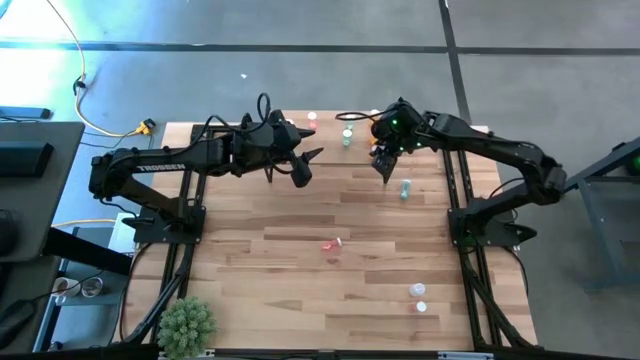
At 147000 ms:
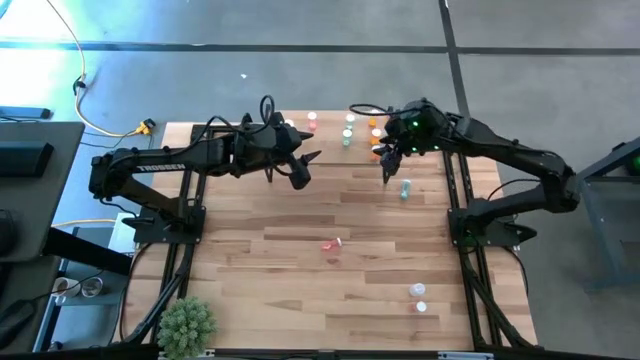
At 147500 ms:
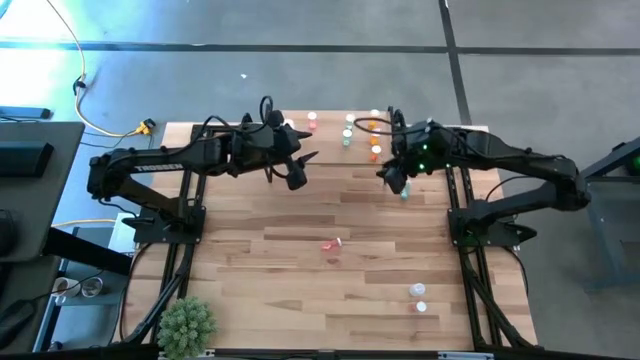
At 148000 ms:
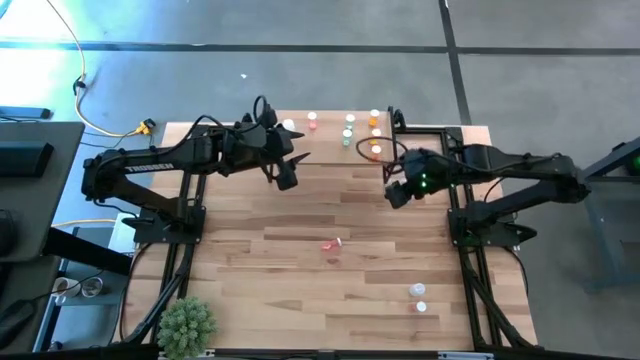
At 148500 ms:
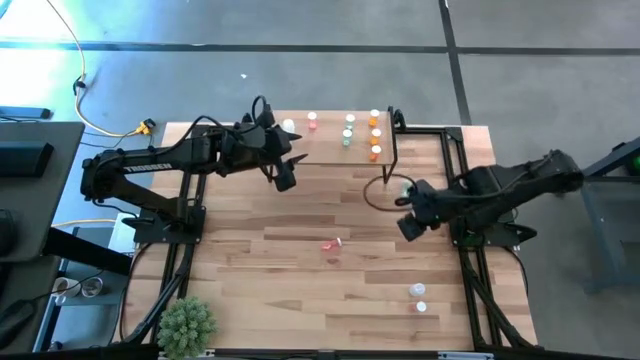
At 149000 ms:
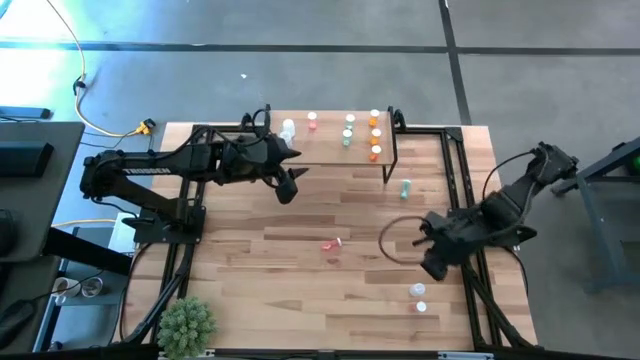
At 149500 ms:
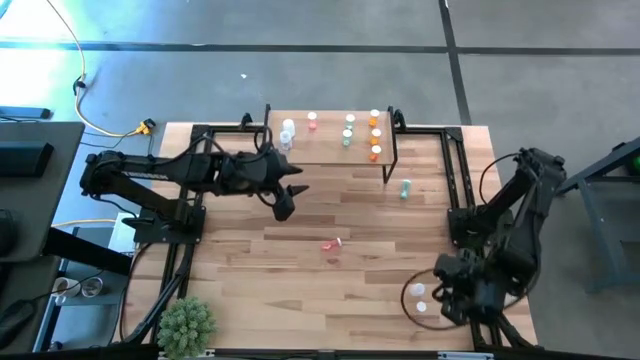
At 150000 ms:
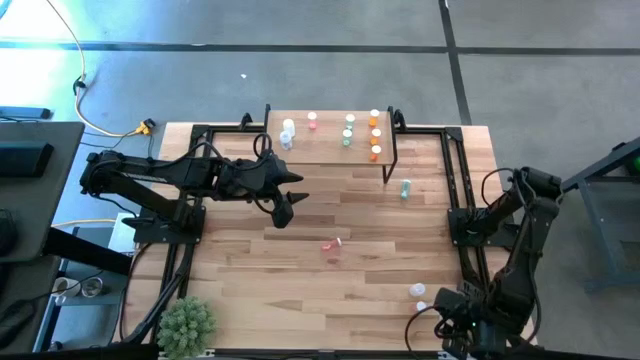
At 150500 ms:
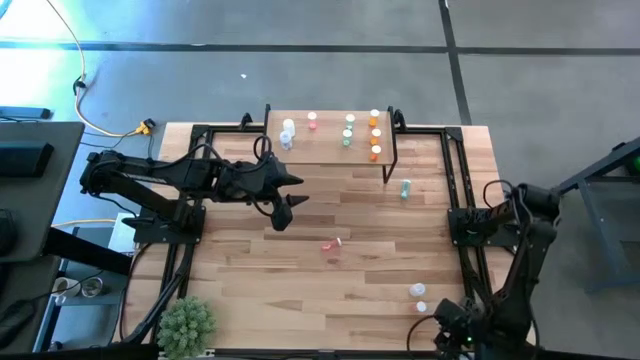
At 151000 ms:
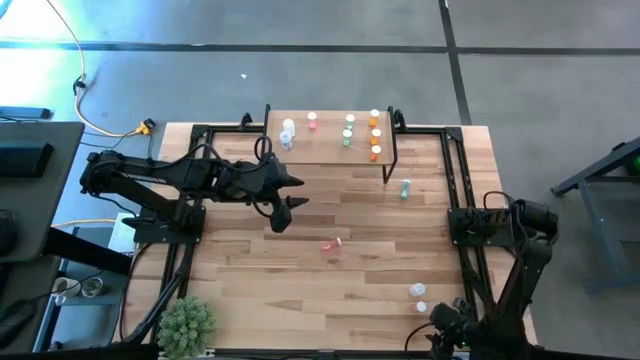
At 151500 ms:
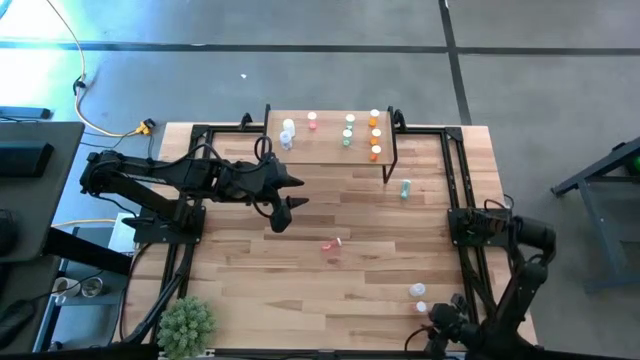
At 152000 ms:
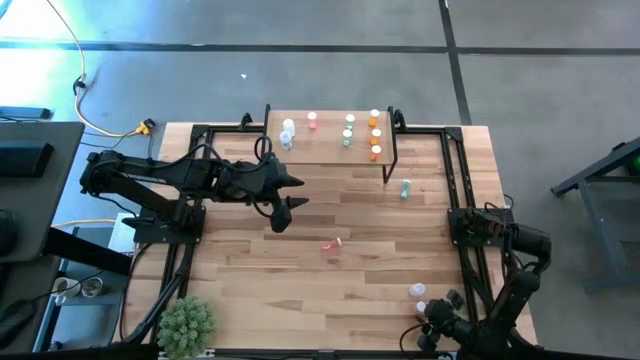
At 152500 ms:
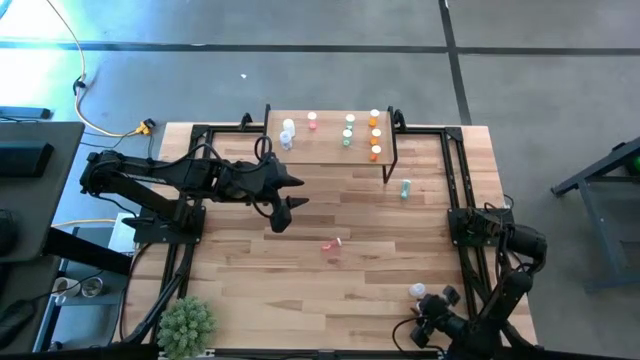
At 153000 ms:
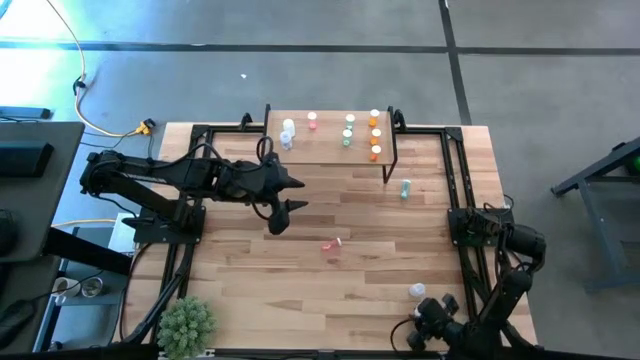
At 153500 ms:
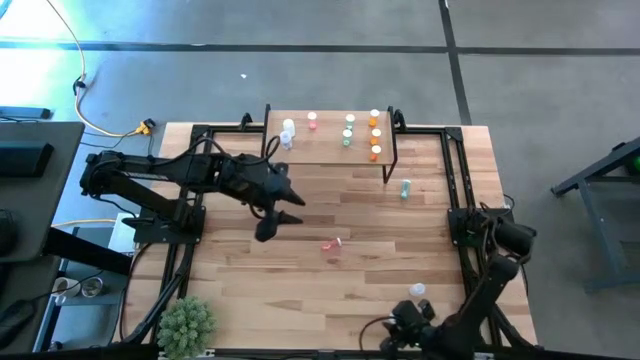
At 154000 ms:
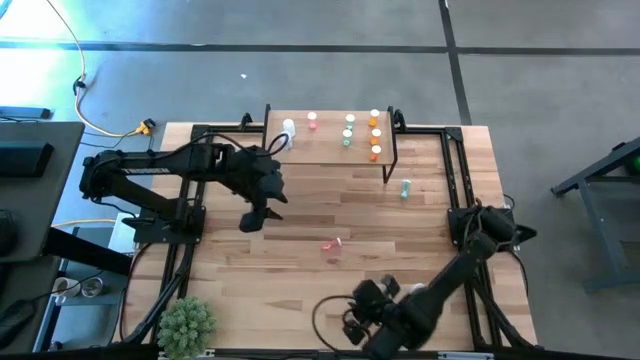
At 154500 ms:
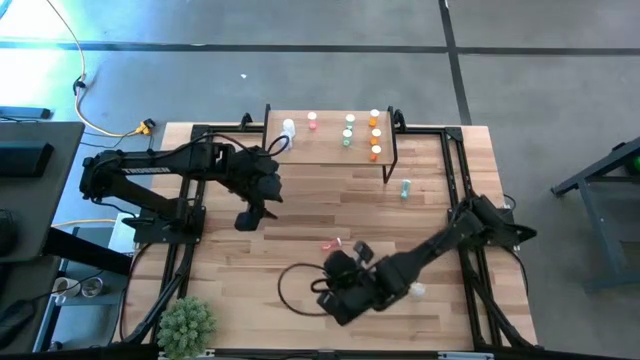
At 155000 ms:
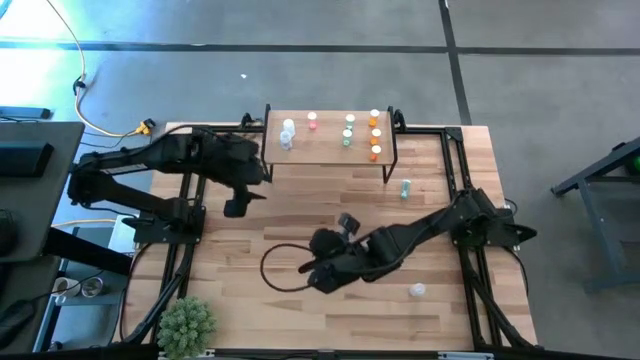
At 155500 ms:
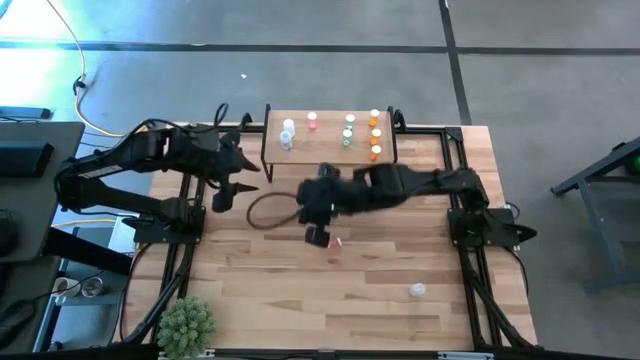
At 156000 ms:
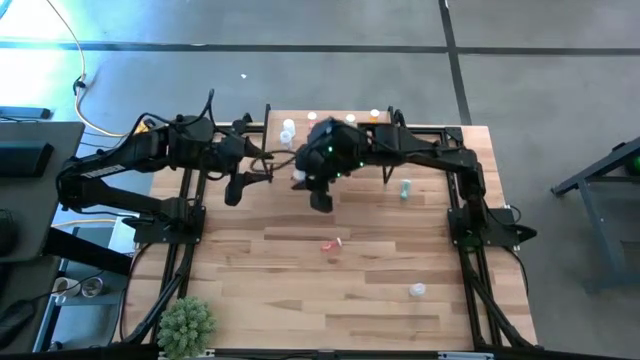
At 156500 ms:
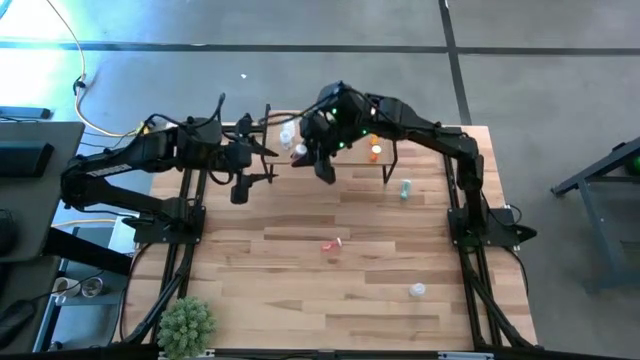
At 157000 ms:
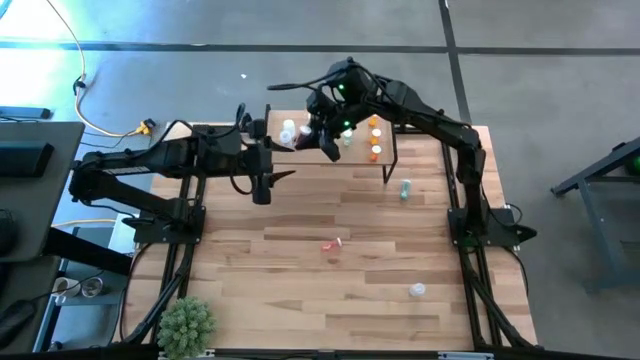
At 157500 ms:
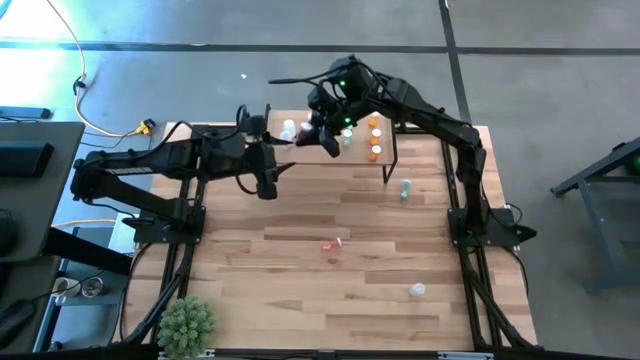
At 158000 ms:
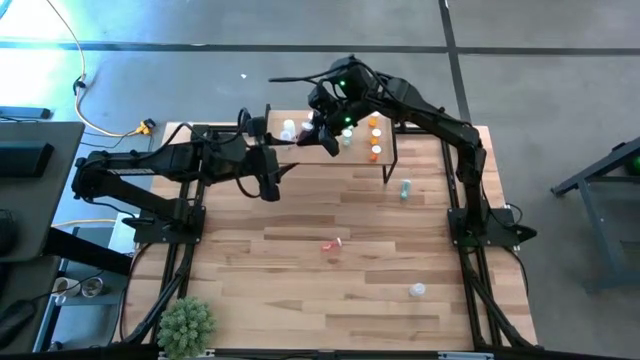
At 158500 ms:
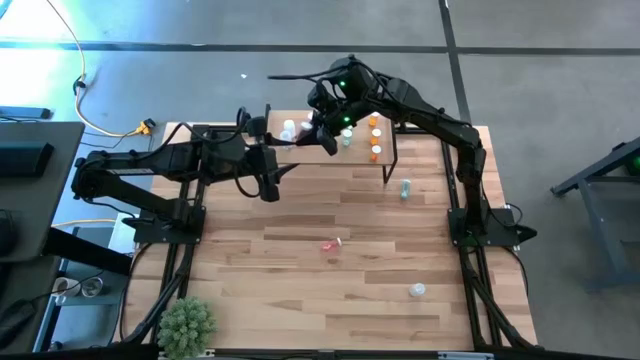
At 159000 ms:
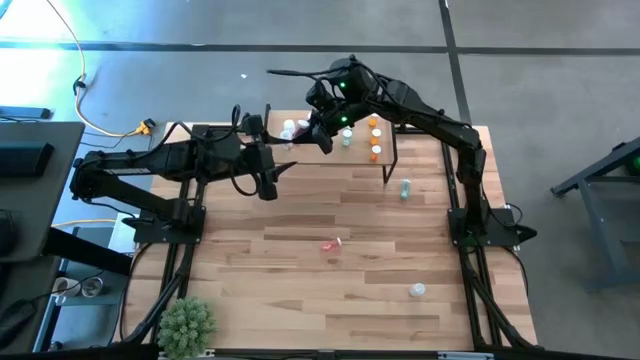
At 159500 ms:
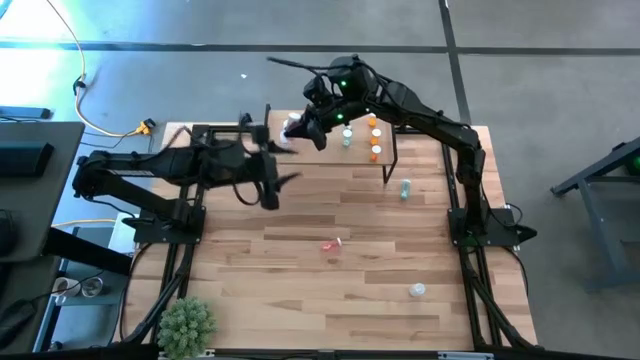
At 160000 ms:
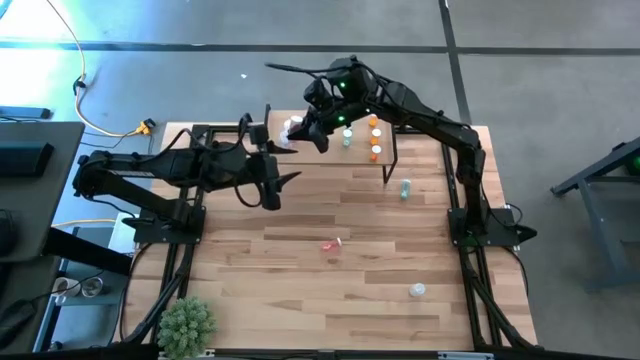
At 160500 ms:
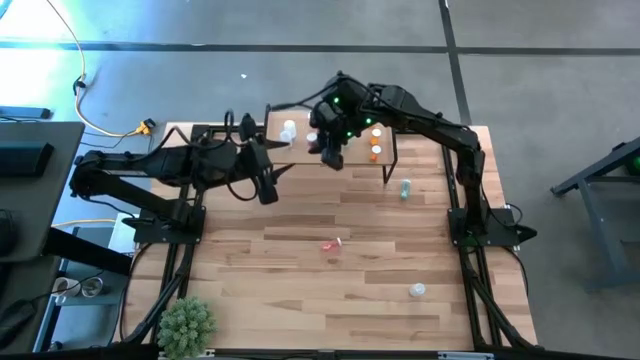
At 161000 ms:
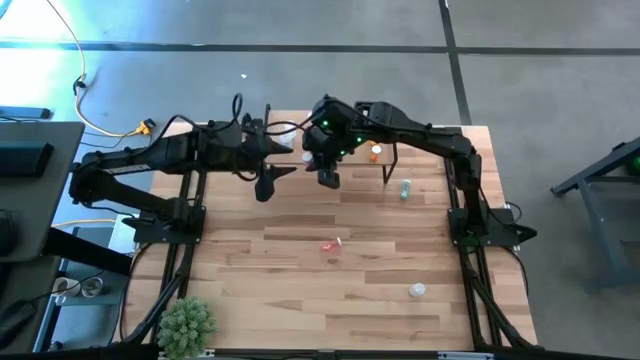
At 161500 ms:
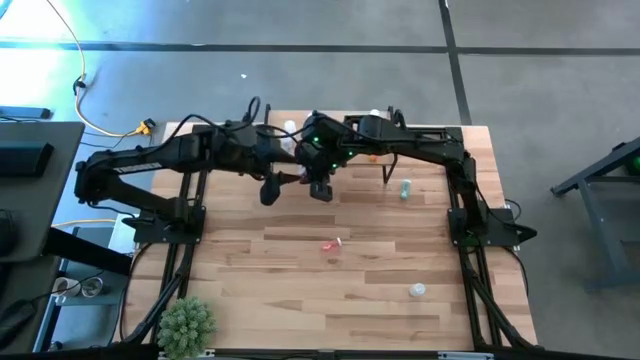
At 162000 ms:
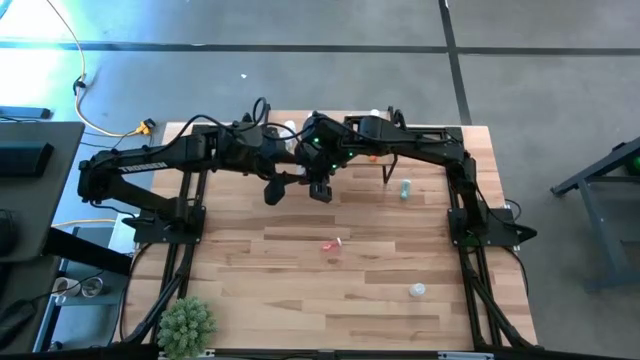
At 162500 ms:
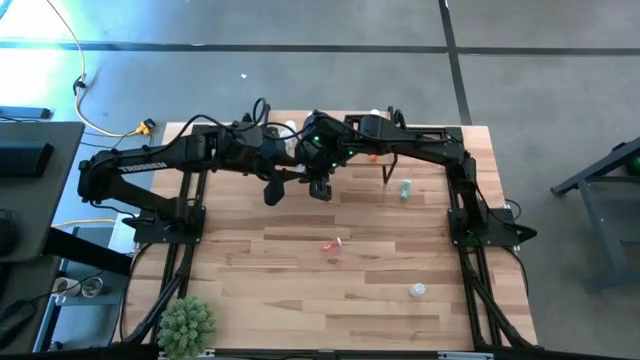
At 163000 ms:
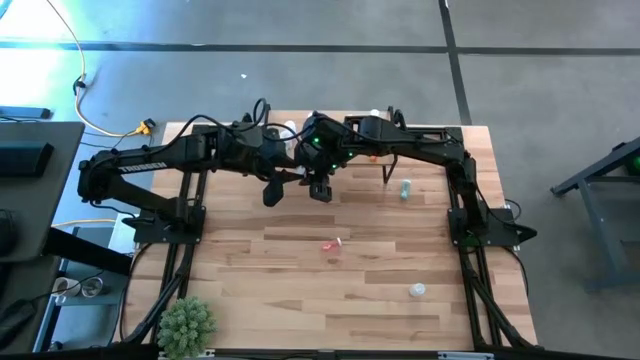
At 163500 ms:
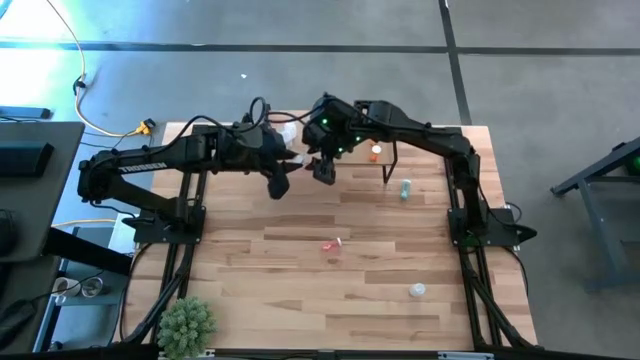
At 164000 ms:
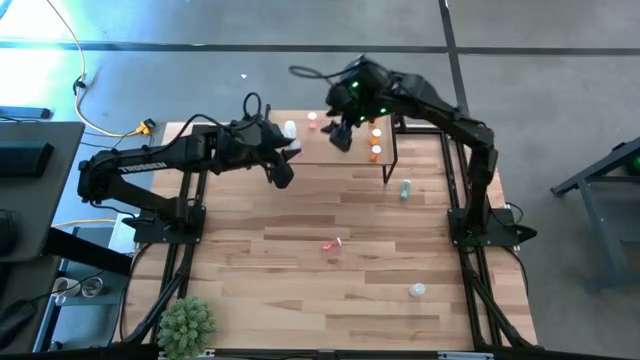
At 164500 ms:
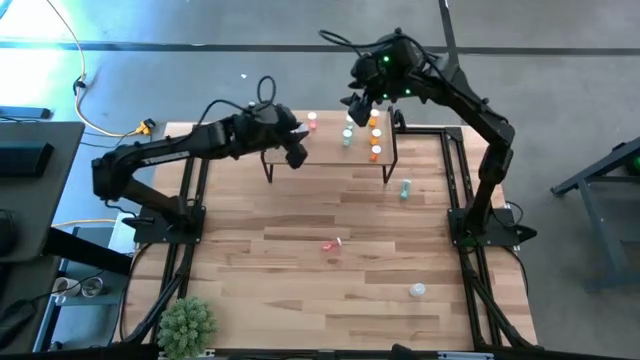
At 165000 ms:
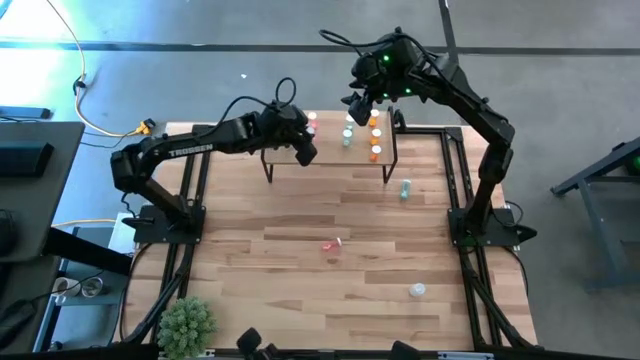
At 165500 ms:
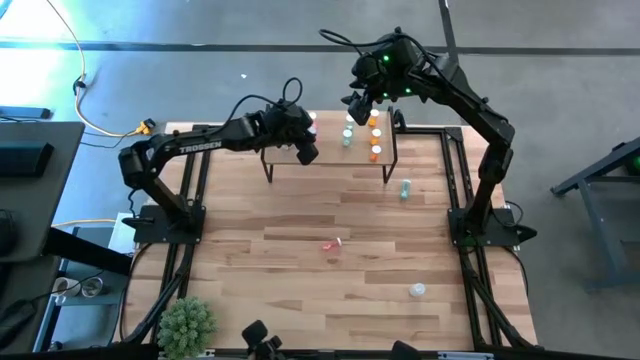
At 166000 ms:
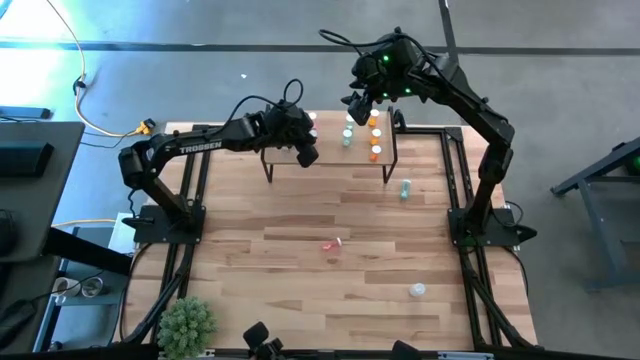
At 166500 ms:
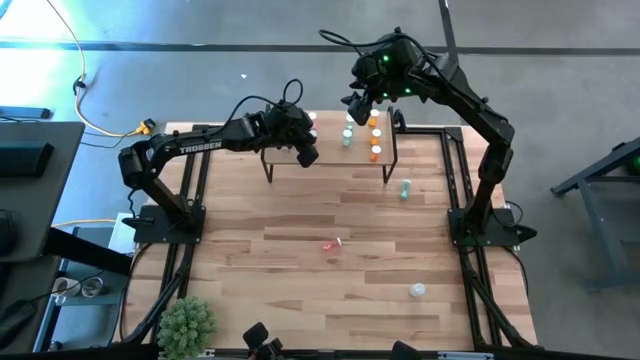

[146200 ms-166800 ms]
Task: Pick and place medicine bottles onto shelf by color
Put the bottom pink pill bottle on the shelf aligned with the other pink pill bottle

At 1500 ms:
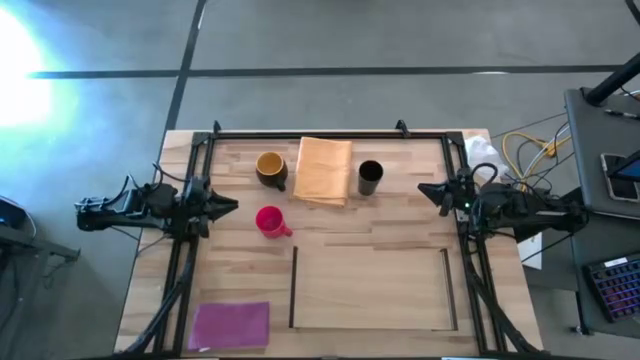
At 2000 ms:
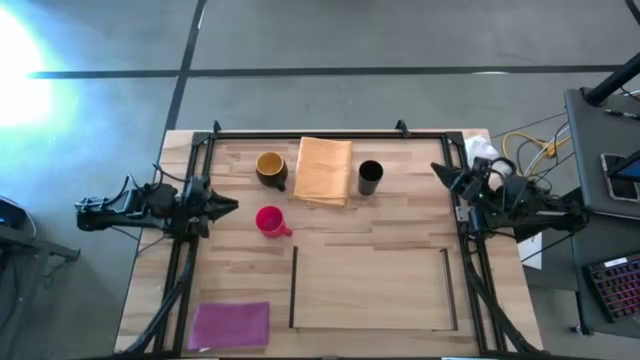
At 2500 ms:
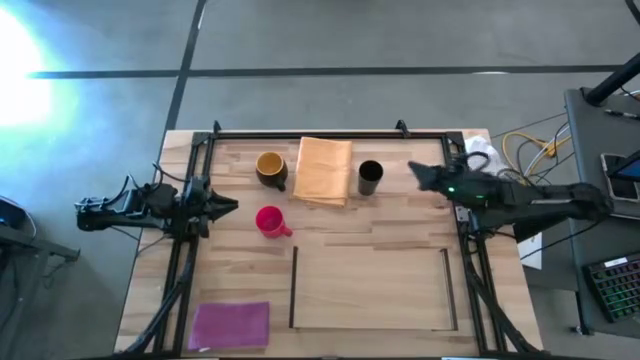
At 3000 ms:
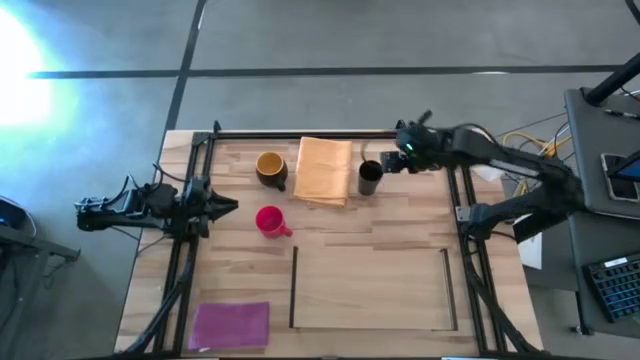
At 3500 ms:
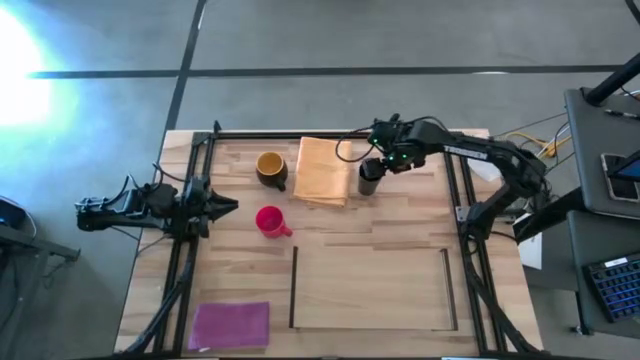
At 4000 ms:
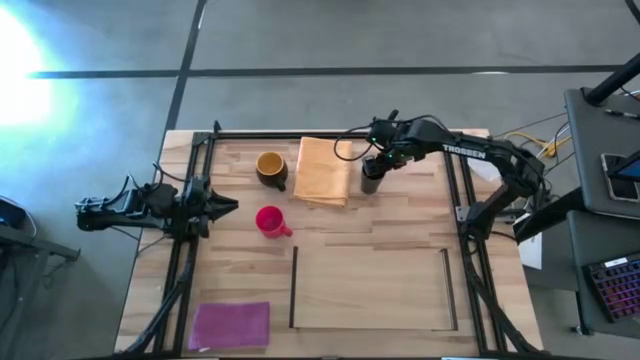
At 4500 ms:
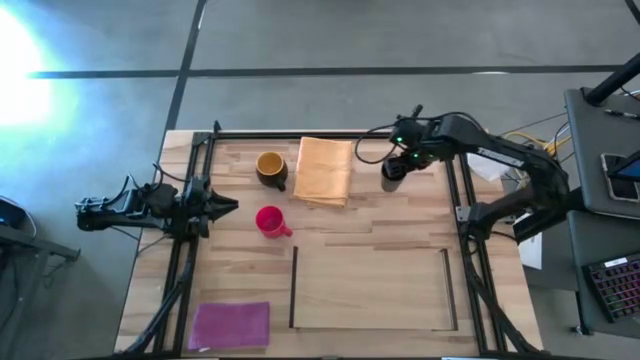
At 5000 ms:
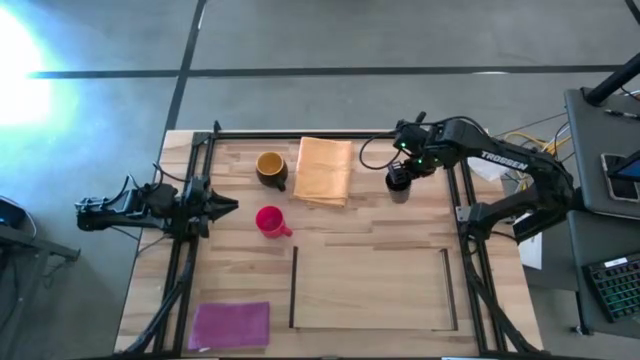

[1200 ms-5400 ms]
Task: Stack small to large cups/mugs on shelf
Put the black cup on the shelf
